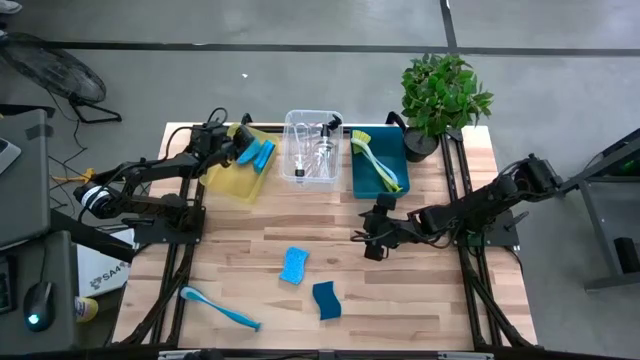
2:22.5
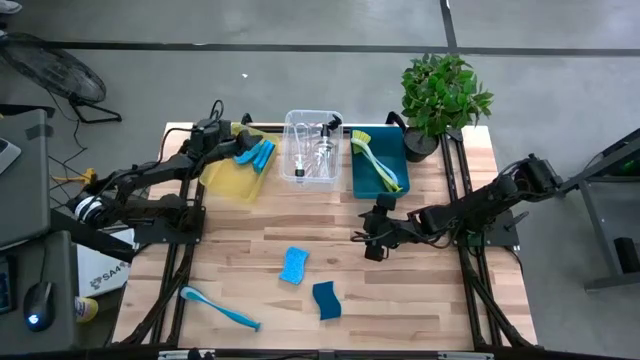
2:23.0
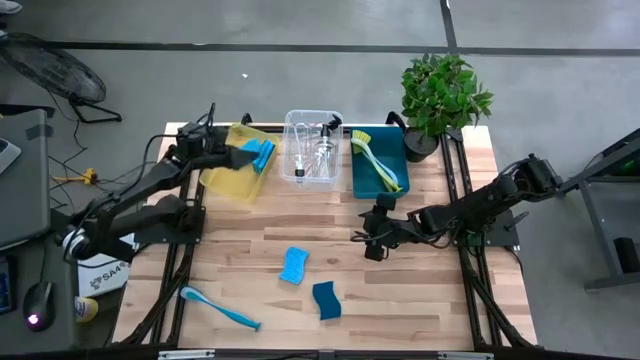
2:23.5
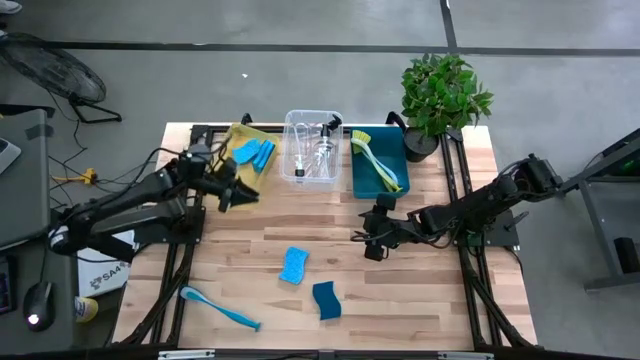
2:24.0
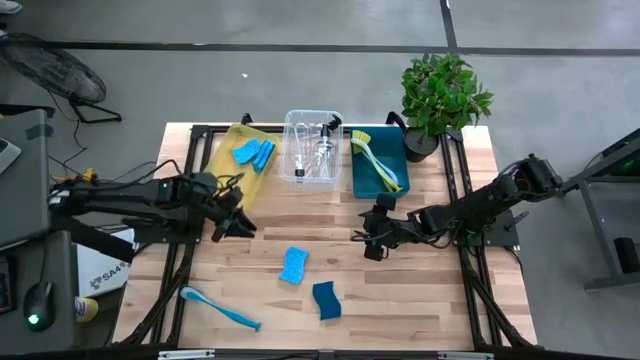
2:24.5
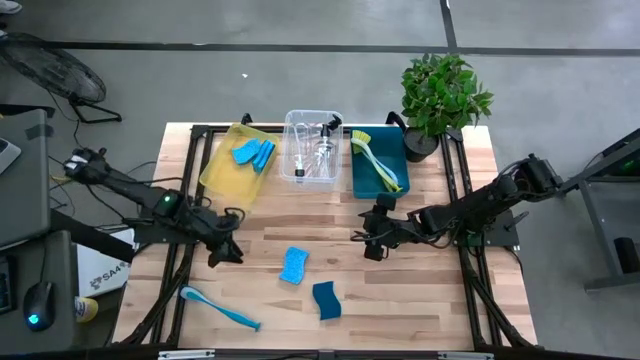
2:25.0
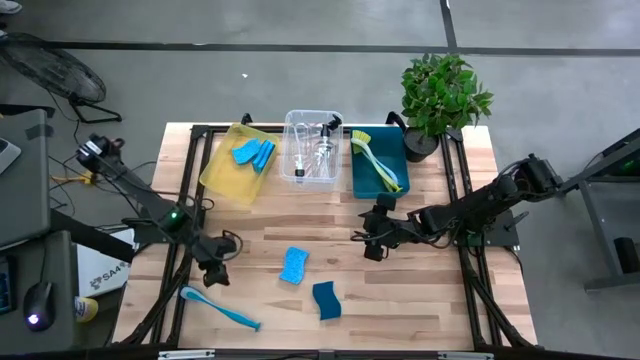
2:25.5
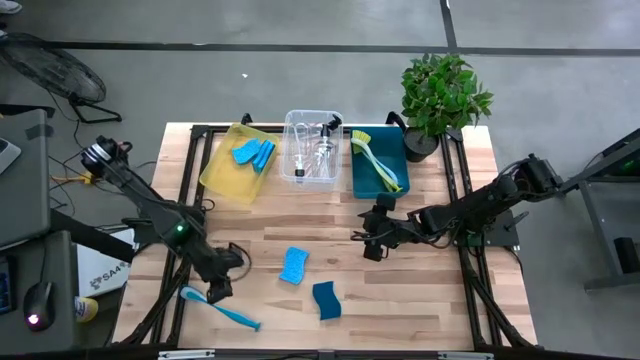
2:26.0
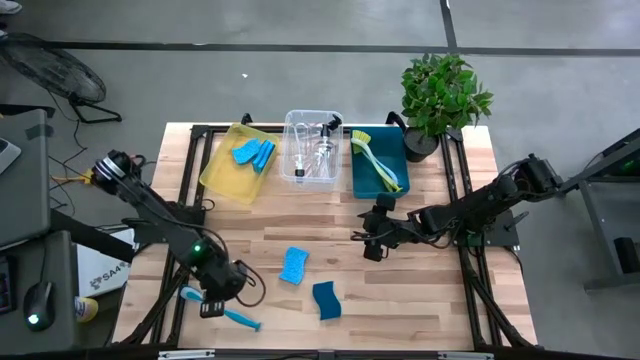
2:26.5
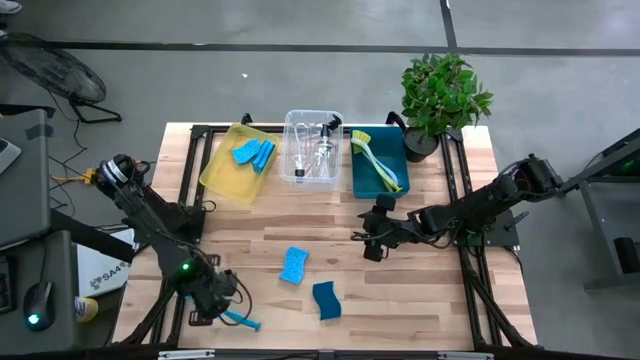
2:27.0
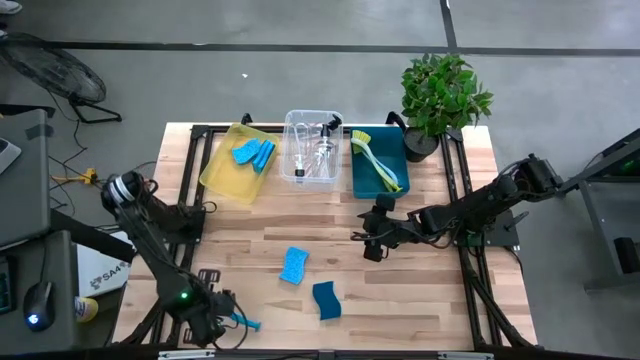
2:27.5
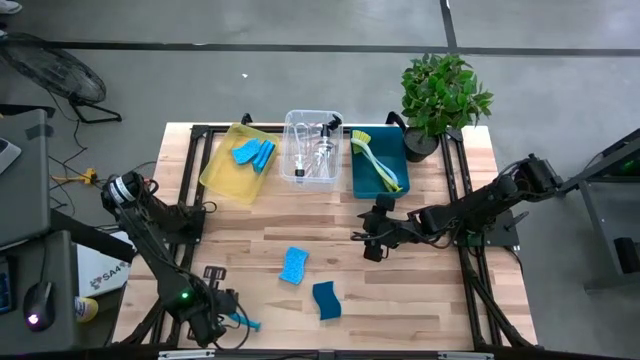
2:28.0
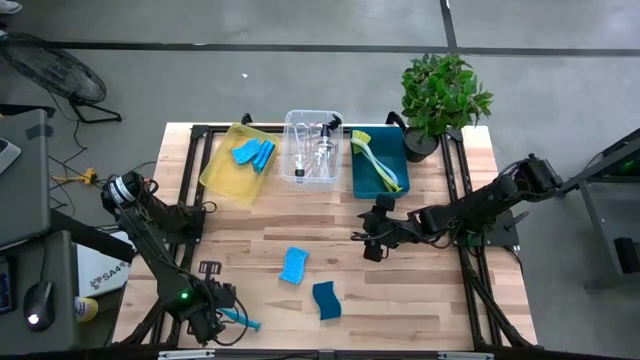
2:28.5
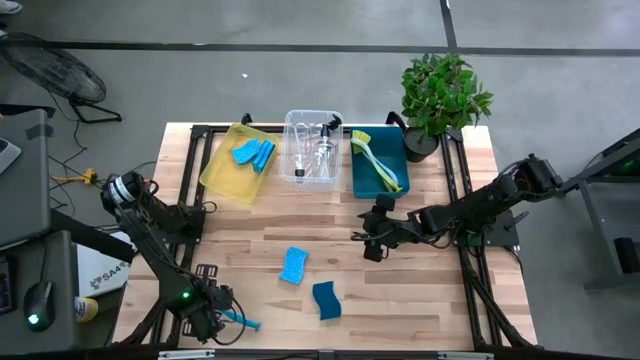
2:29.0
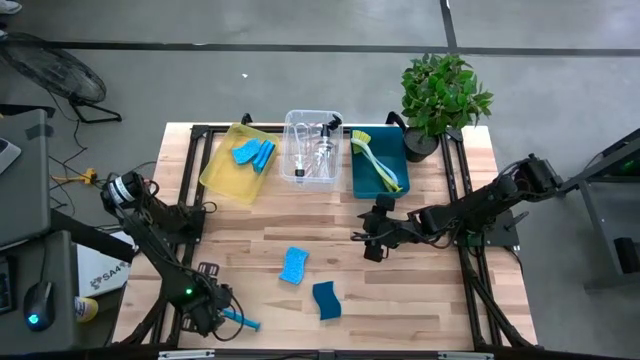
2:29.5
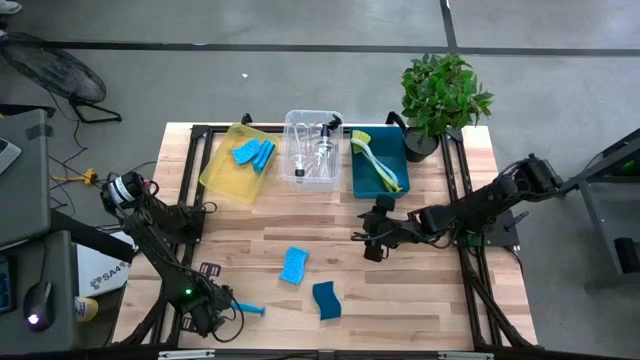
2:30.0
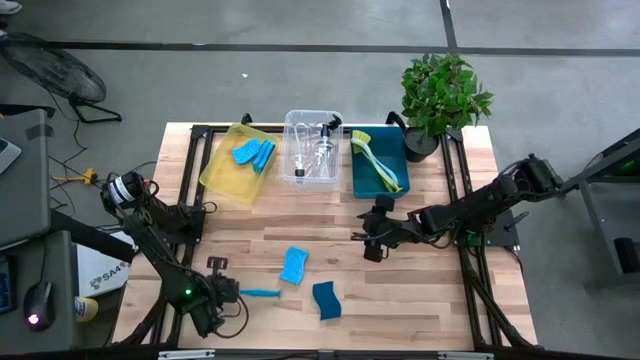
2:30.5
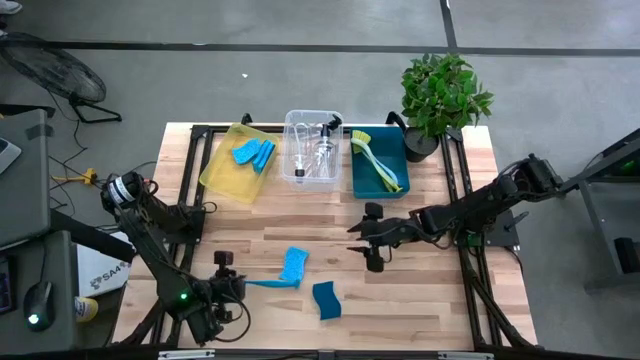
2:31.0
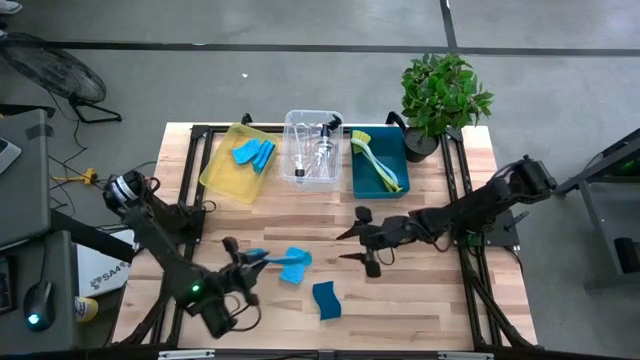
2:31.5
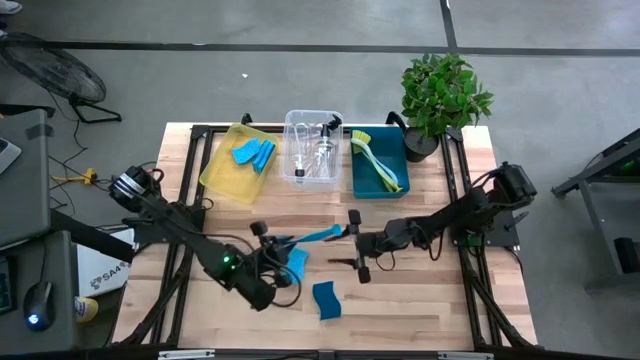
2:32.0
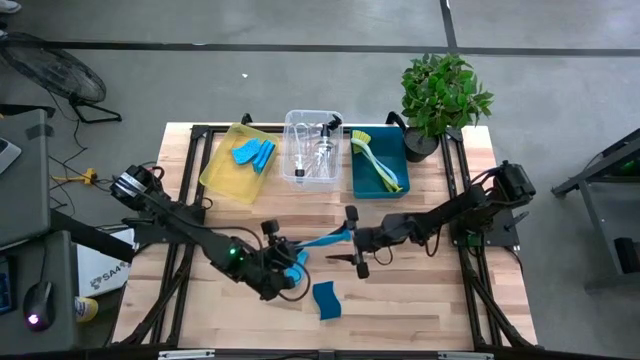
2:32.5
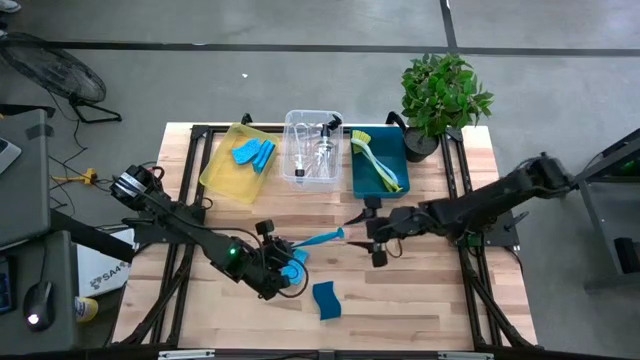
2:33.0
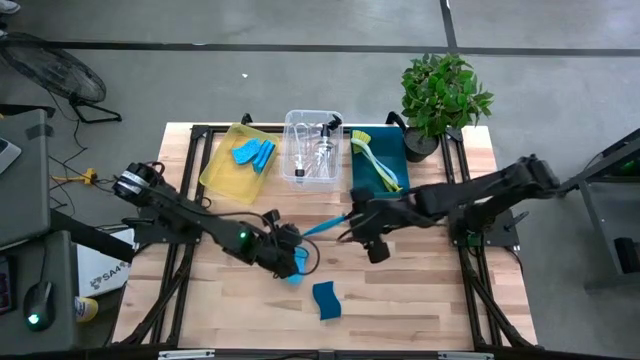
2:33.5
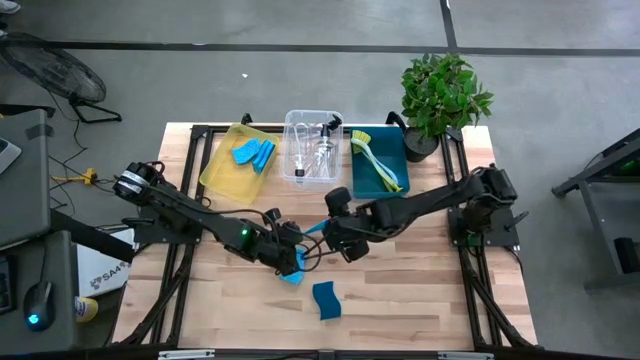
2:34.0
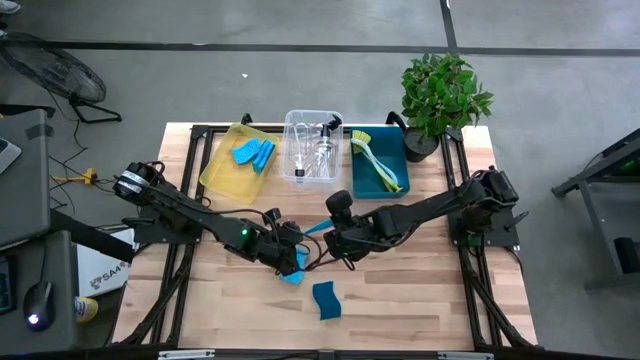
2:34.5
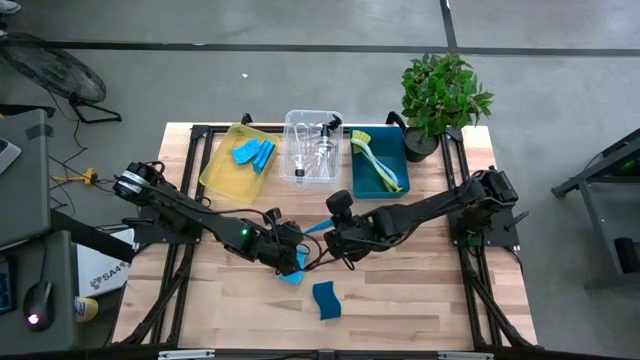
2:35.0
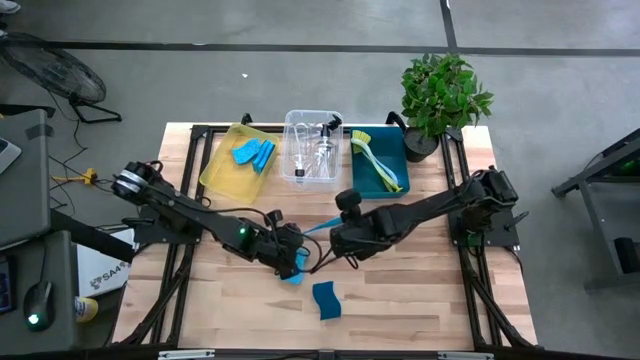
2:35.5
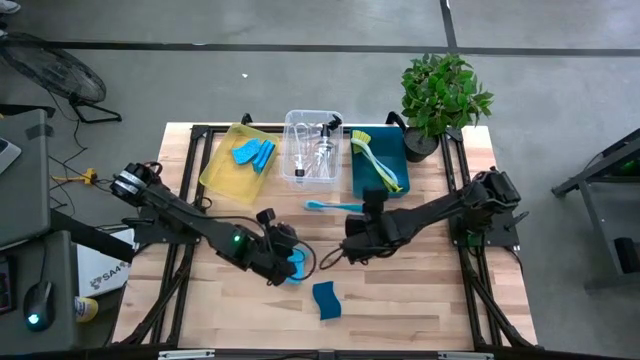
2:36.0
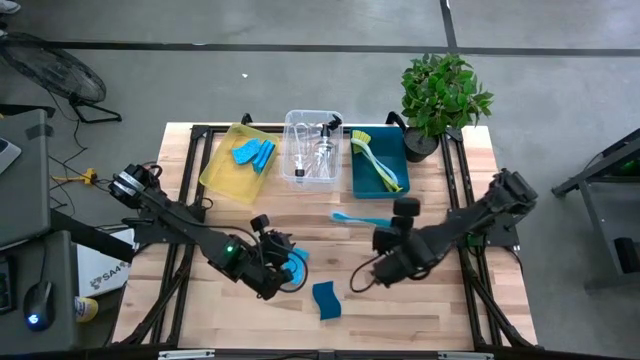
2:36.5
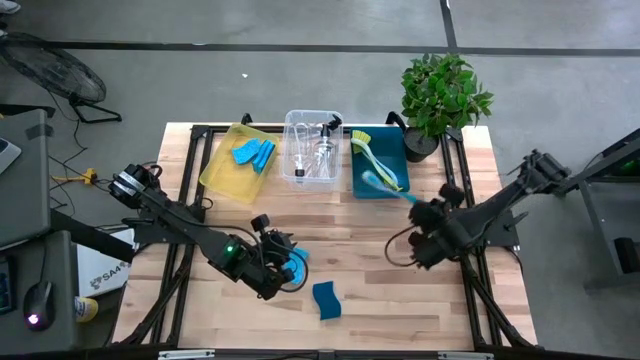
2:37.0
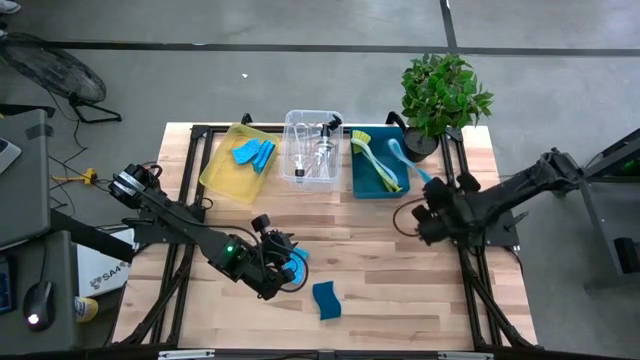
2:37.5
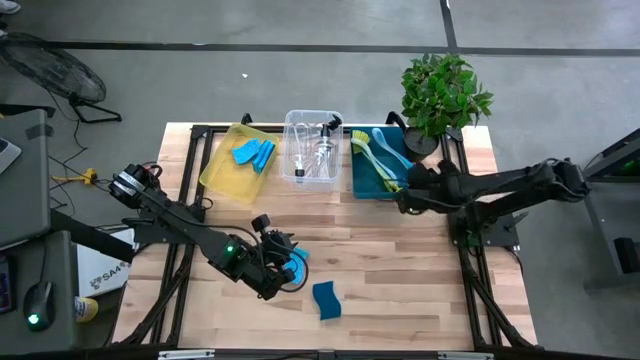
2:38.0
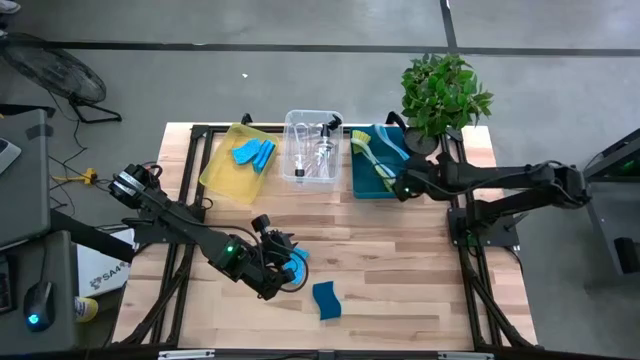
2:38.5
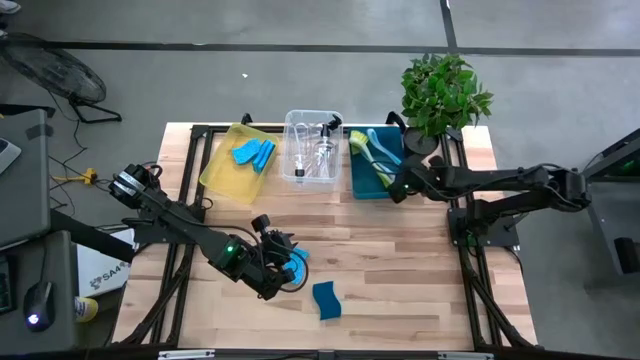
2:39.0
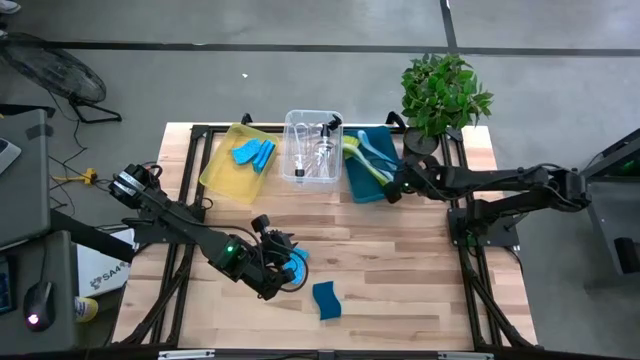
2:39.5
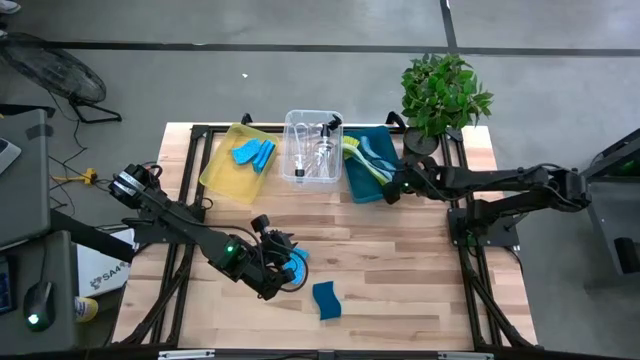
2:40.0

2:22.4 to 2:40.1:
Task: Pick & Place Kitchen Sink Supplies
Put the blue dish brush into the blue bin

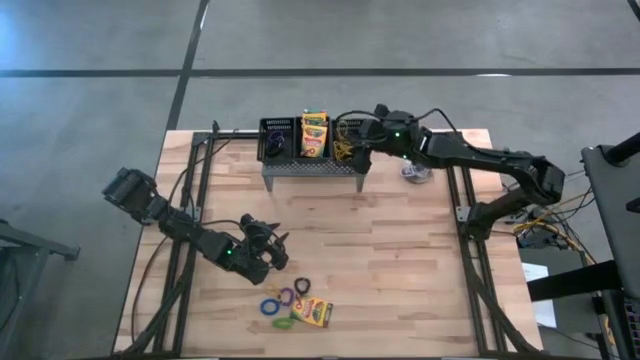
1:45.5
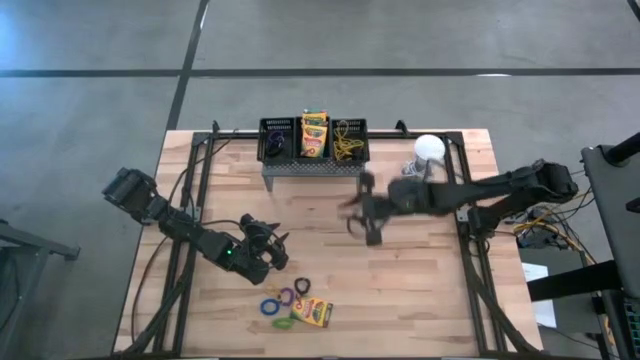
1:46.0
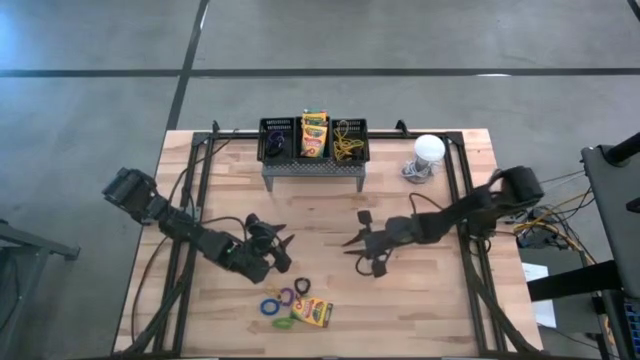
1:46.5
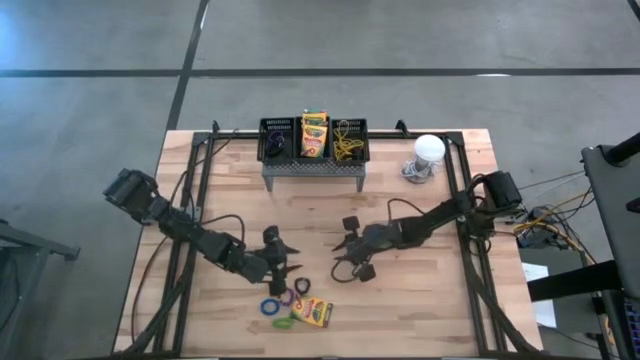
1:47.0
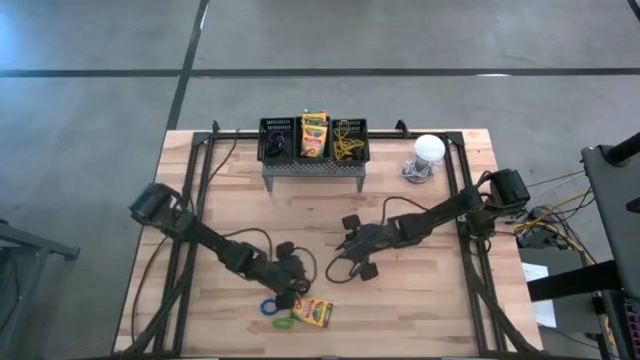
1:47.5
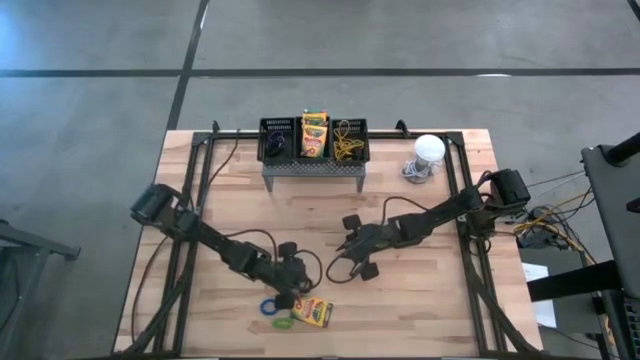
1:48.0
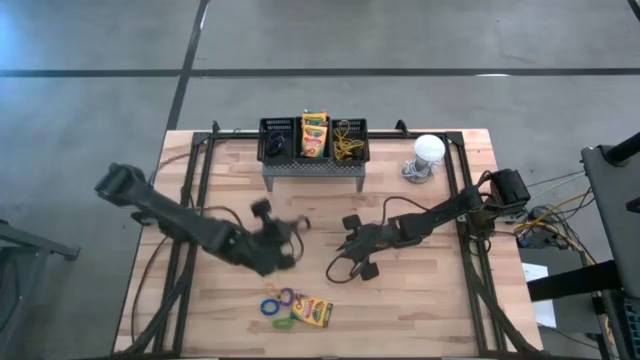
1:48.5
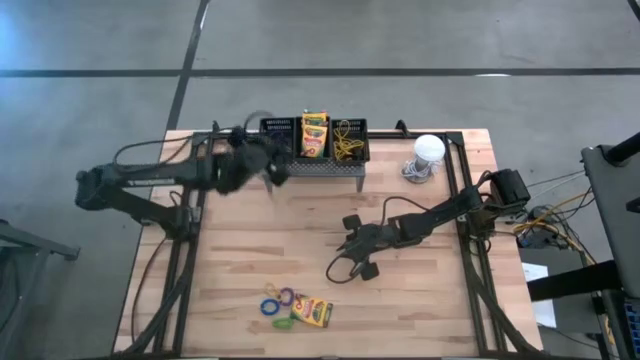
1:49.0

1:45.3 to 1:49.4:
Task: Pick & Place Office Desk Supplies
Put the black spring keychain into the left black basket on the shelf
